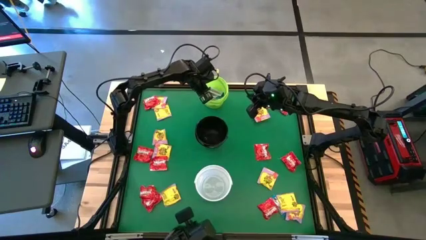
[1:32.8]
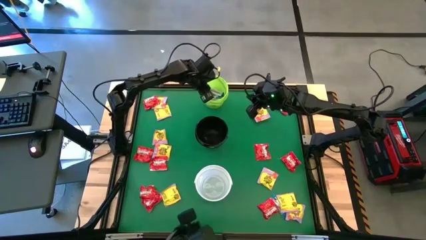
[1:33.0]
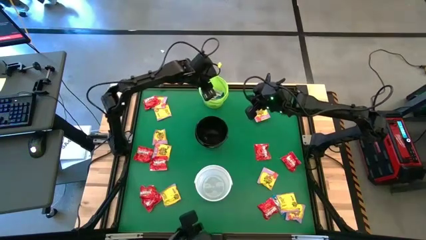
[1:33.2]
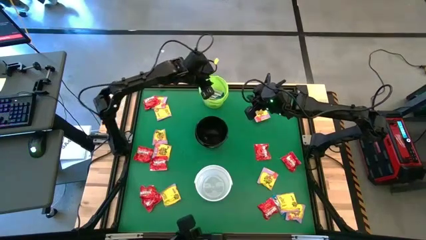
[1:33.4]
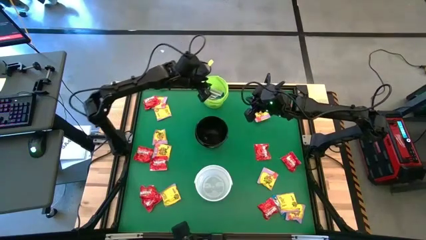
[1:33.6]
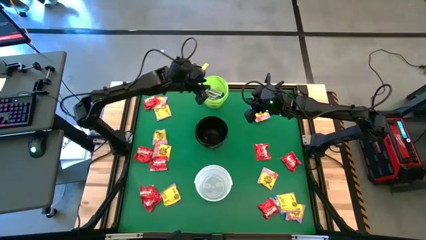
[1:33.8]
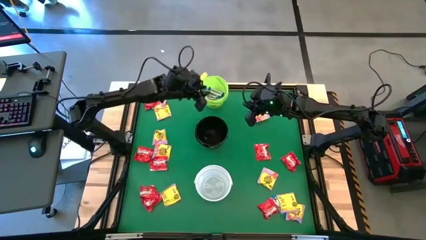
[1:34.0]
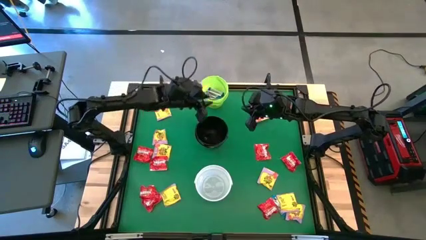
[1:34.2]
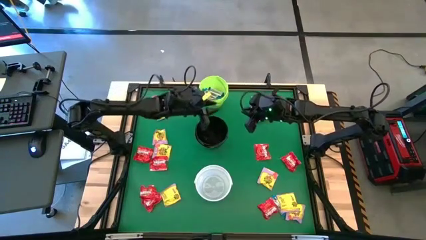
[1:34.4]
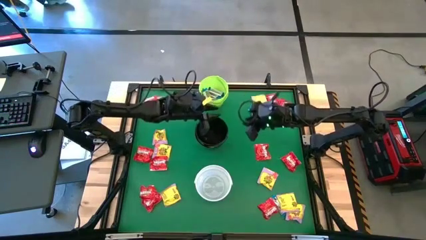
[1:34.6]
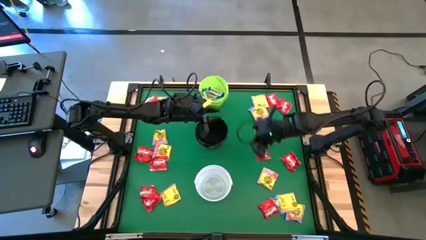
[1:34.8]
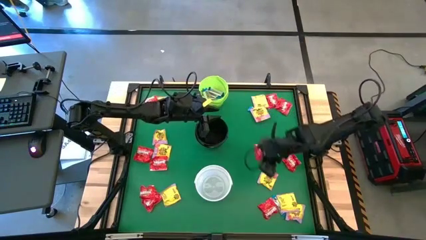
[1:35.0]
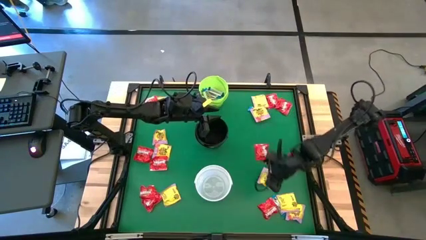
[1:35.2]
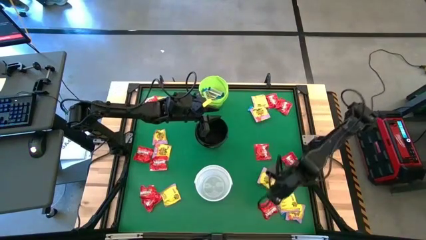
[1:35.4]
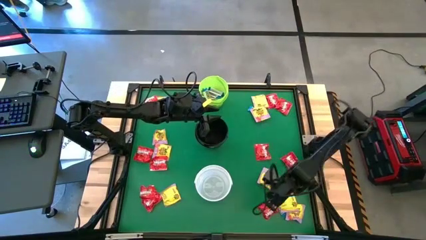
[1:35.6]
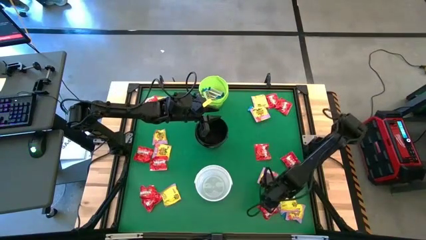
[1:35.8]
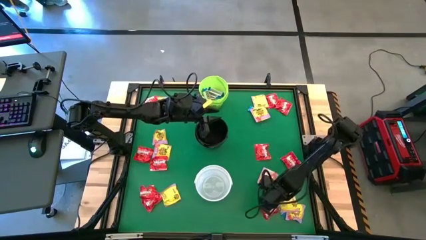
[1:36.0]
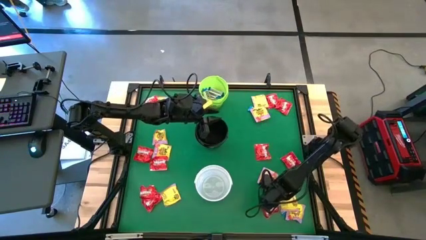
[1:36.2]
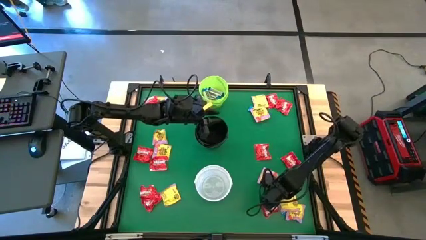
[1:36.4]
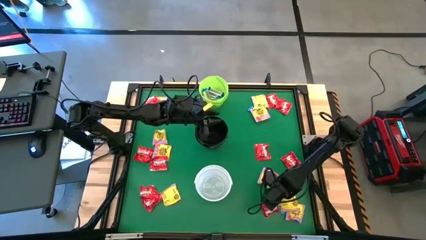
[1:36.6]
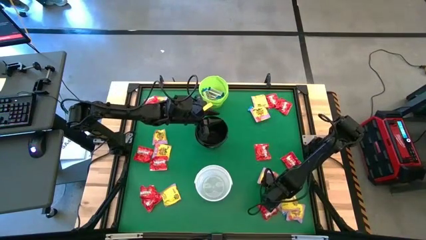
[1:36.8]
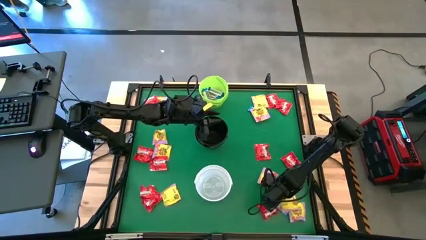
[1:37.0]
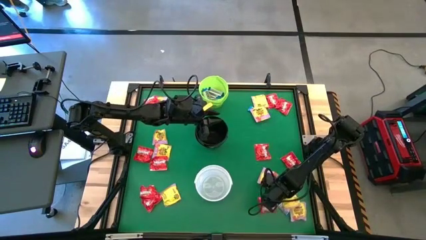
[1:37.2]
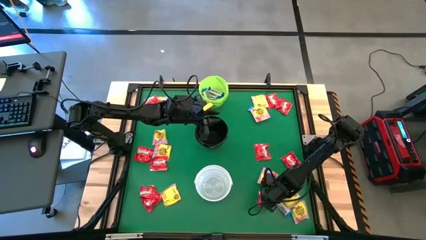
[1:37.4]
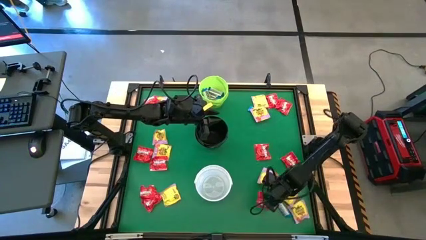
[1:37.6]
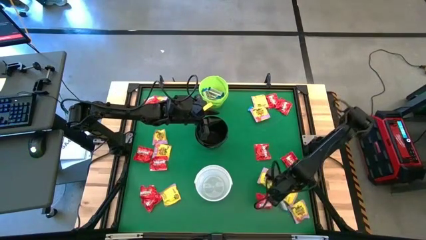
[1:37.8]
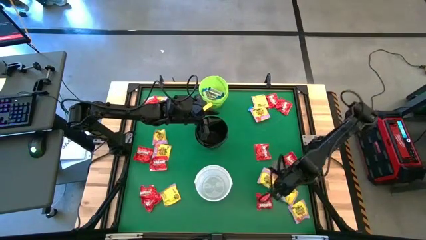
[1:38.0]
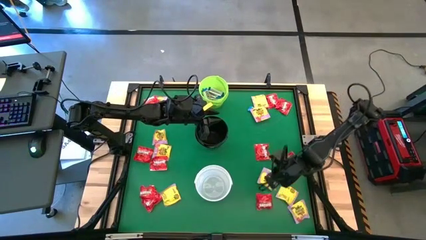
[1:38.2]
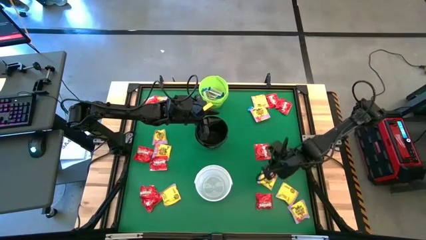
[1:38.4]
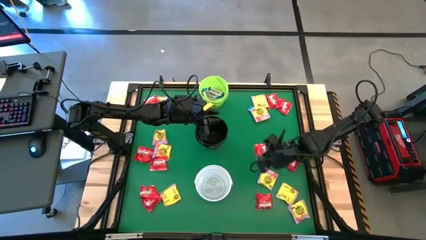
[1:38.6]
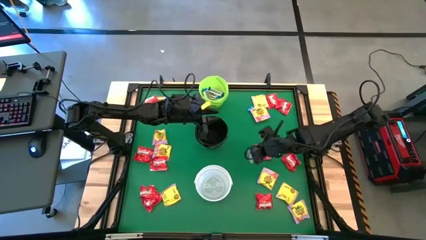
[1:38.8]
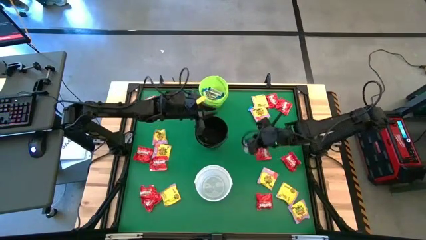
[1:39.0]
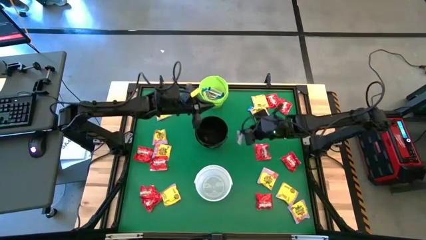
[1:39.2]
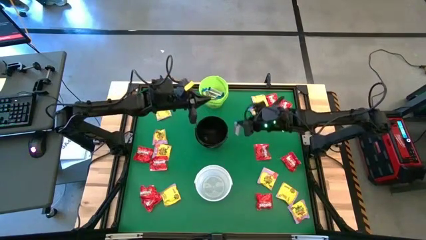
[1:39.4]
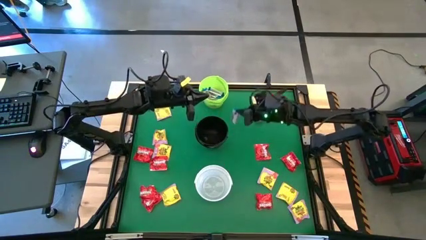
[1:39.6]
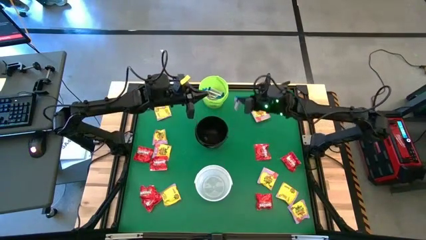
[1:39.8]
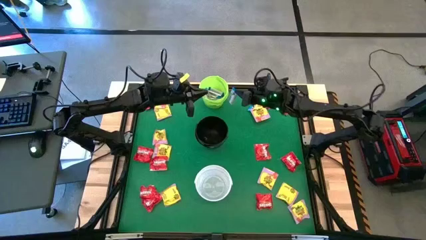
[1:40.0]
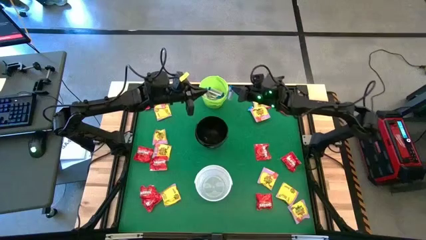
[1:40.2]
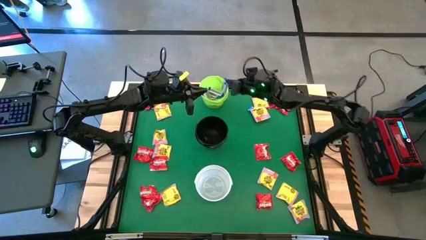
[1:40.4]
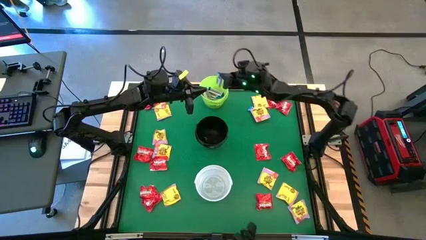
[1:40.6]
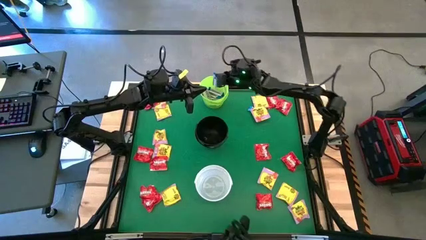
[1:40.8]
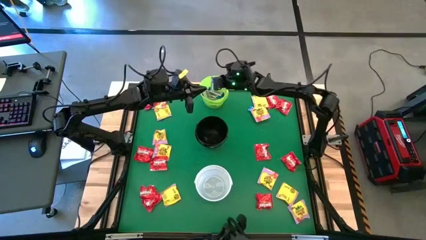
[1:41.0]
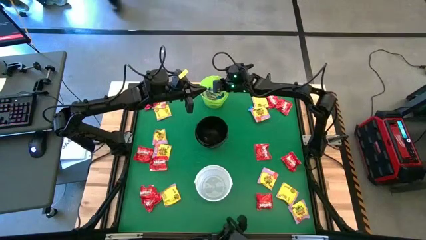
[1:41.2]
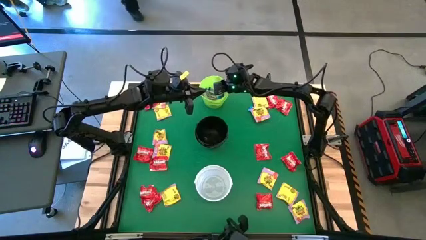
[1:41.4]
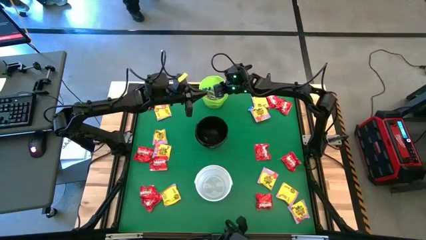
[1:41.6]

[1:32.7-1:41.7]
Task: Sort candy by brand, put in halloween buckets
Put the white chocolate into the green bucket

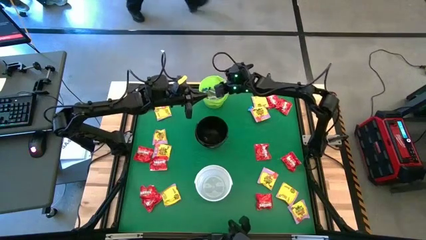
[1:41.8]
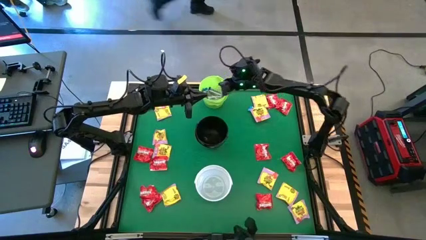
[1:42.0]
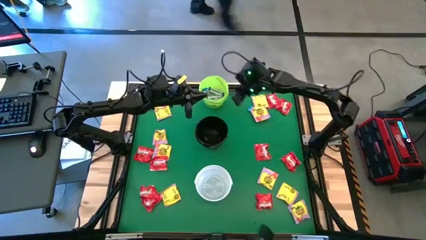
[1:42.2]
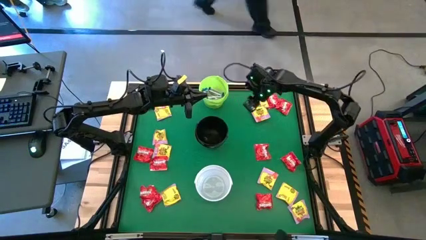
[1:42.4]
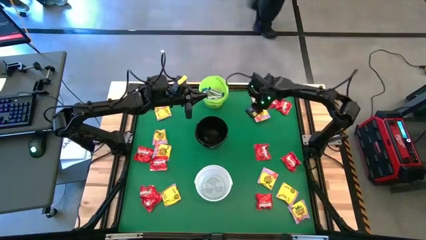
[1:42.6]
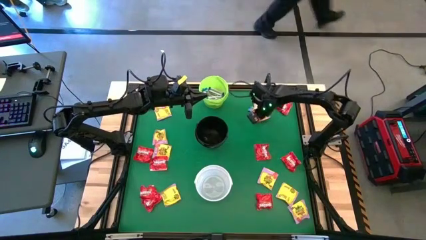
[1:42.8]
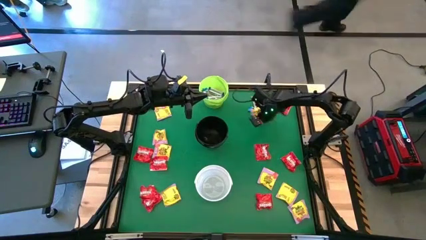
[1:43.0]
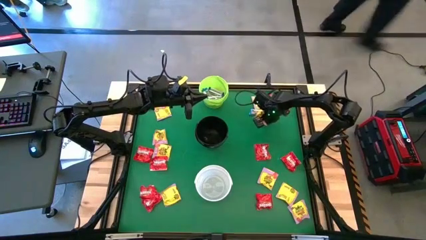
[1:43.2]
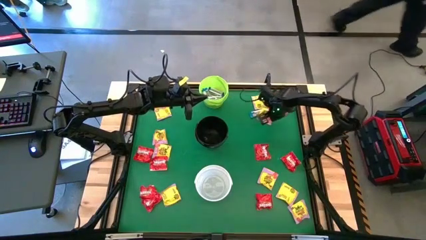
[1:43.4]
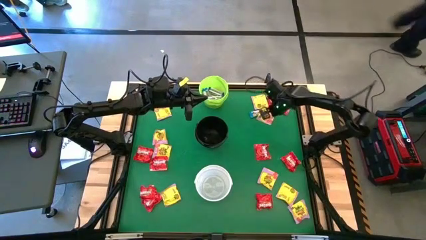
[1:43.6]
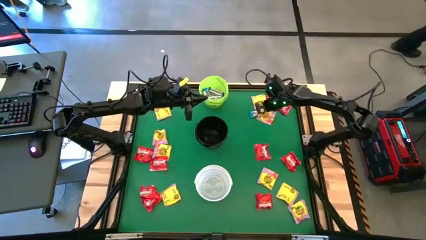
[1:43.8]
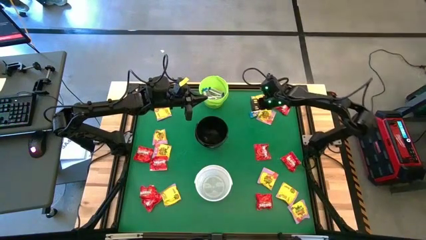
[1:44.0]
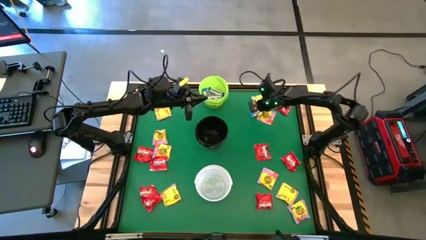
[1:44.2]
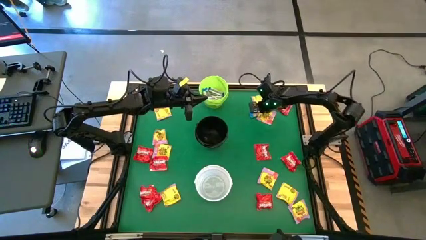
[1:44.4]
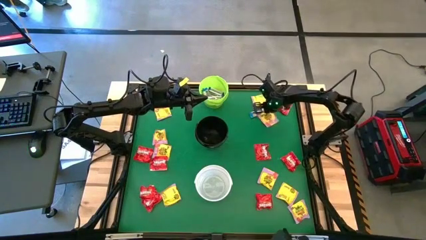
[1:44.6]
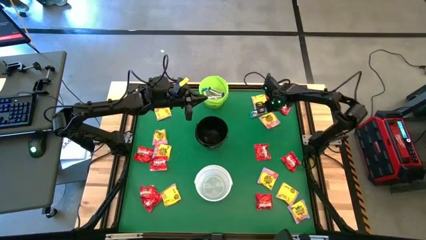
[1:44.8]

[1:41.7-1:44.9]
Adjust the yellow chocolate

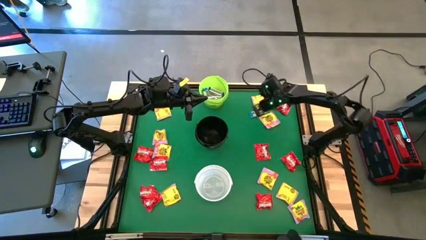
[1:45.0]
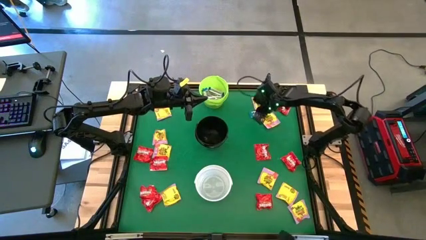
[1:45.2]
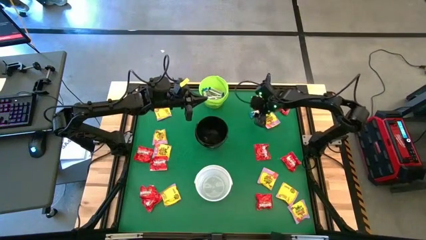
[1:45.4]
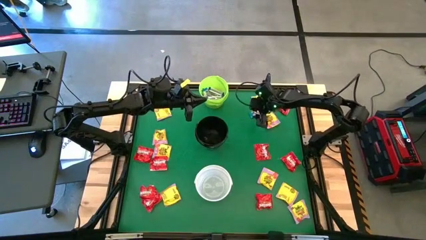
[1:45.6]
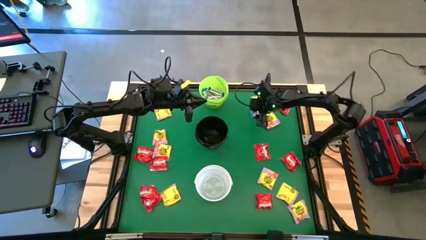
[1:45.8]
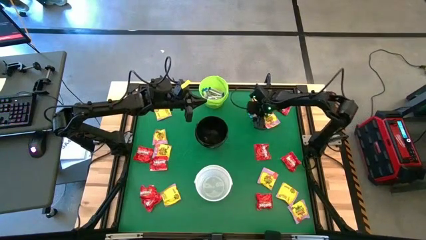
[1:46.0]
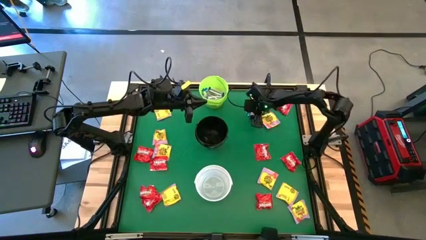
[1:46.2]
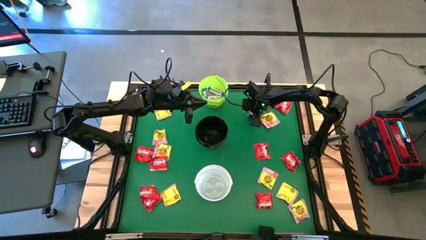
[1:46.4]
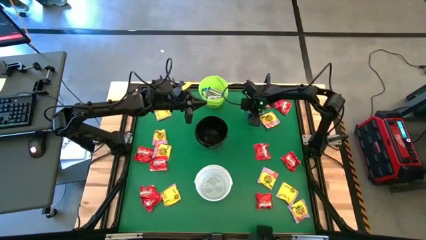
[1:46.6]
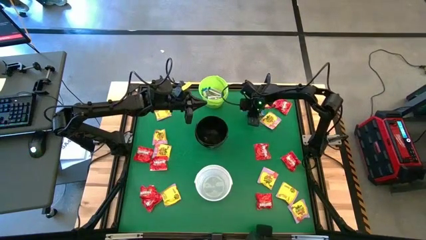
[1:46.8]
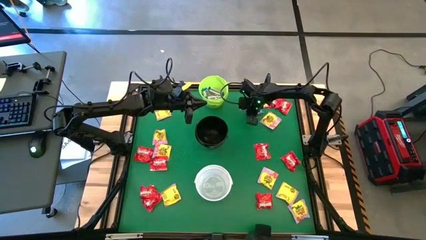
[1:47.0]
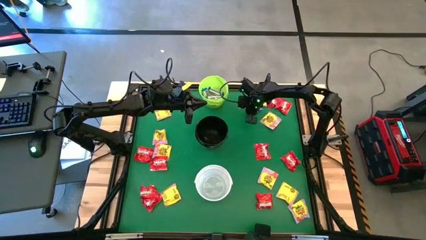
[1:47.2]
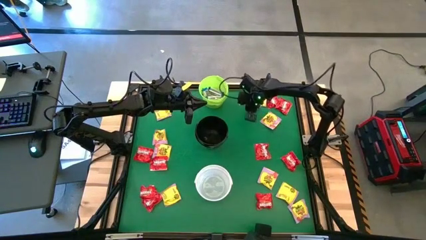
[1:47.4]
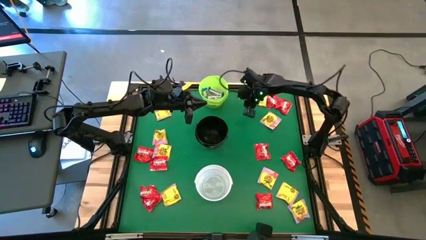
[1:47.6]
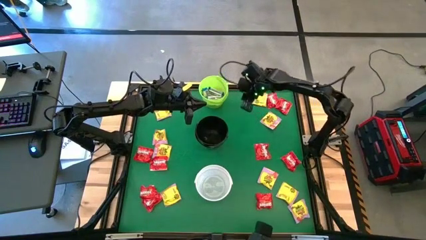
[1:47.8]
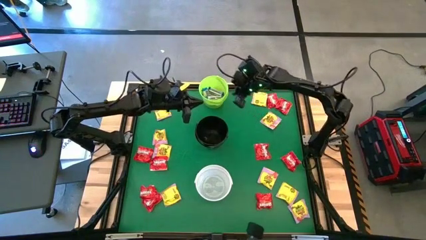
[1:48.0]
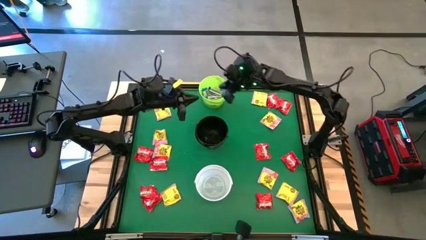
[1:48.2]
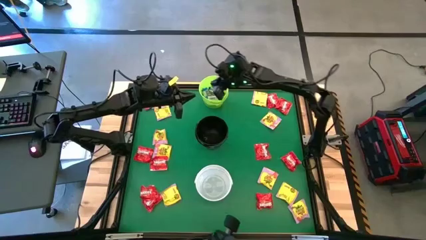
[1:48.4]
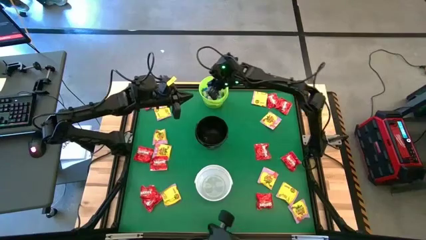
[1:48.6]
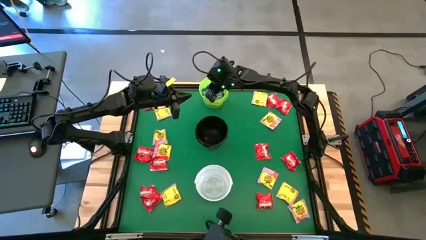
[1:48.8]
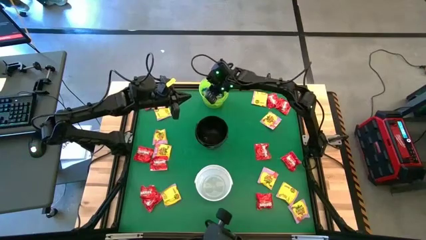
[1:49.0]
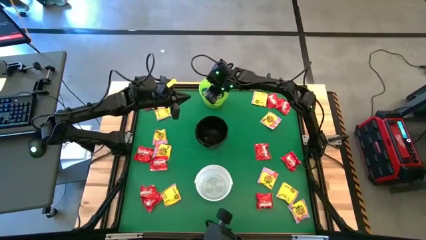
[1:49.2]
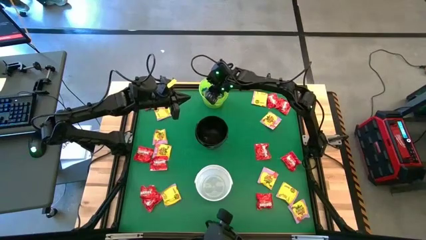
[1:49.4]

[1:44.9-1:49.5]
Put the white chocolate into the green bucket

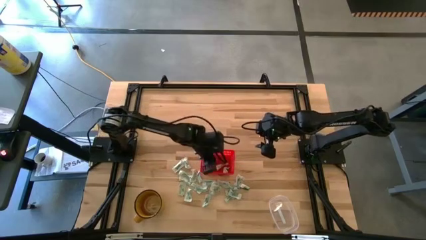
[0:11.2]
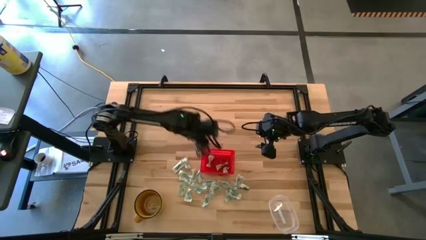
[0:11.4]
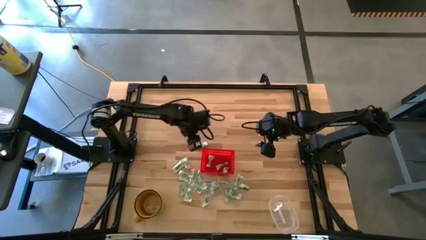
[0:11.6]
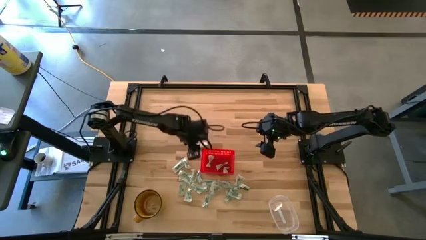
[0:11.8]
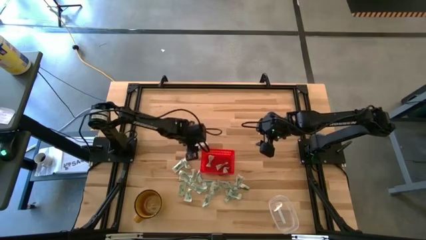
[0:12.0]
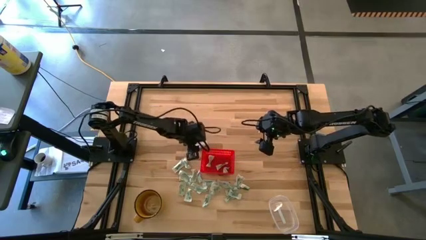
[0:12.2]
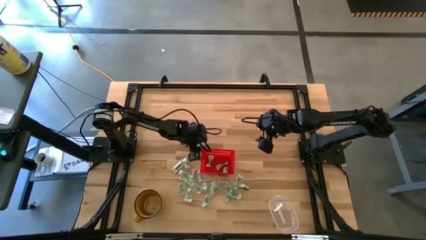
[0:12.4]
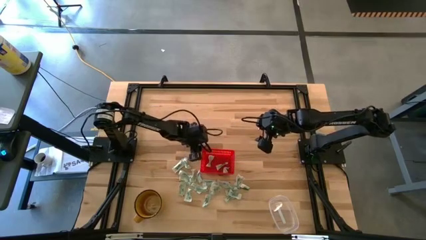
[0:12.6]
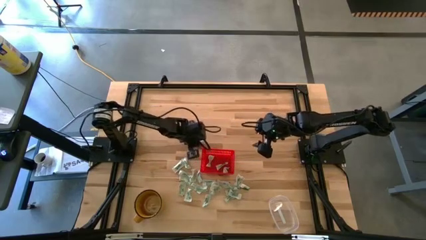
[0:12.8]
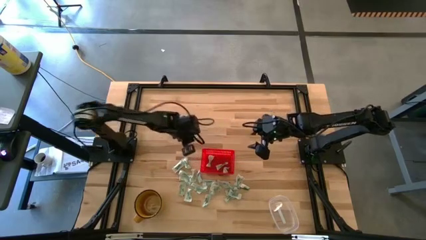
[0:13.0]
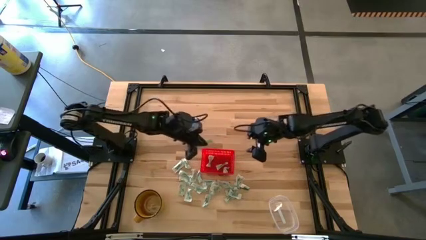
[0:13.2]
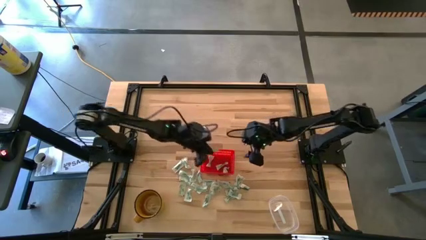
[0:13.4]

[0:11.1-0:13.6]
Task: Pick and place Stevia / Truvia into bins
Put the stevia packet into the orange basket
